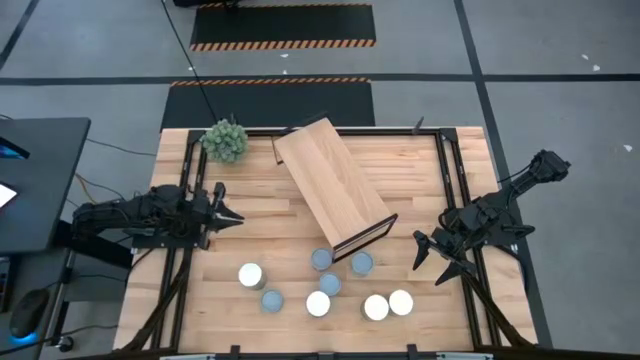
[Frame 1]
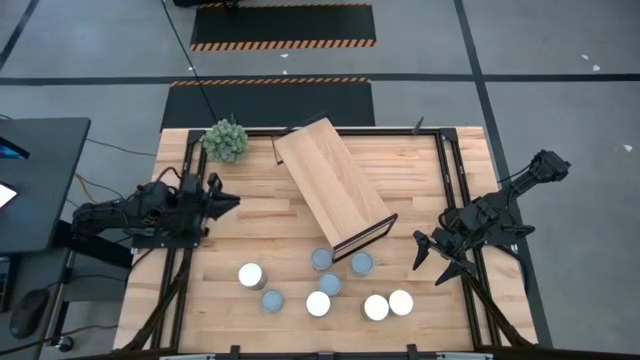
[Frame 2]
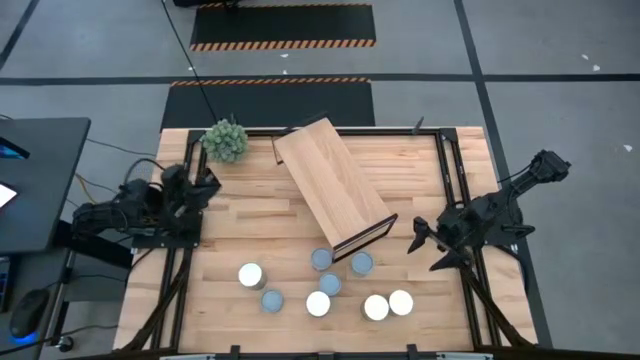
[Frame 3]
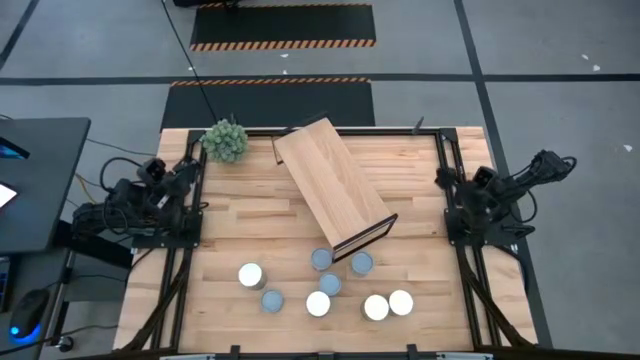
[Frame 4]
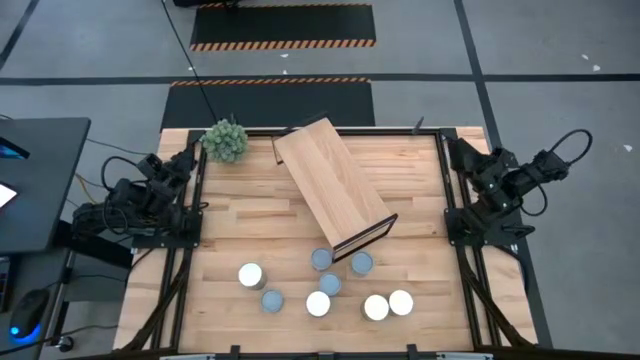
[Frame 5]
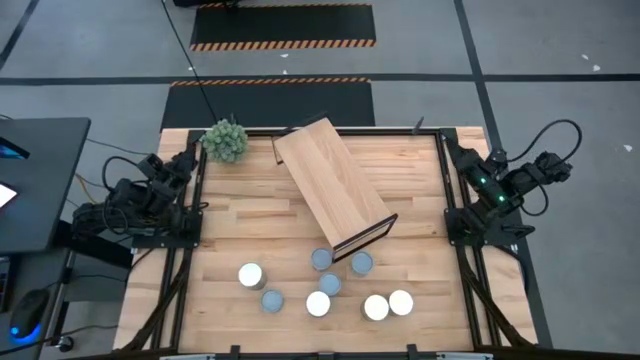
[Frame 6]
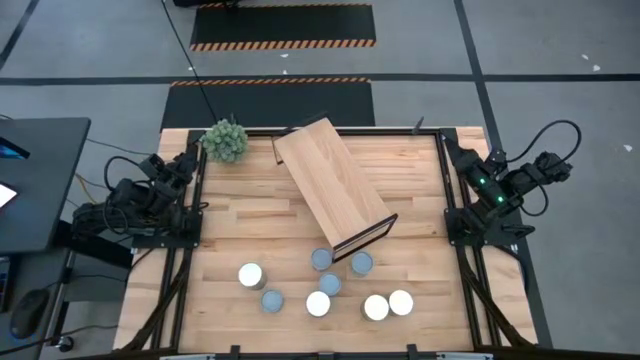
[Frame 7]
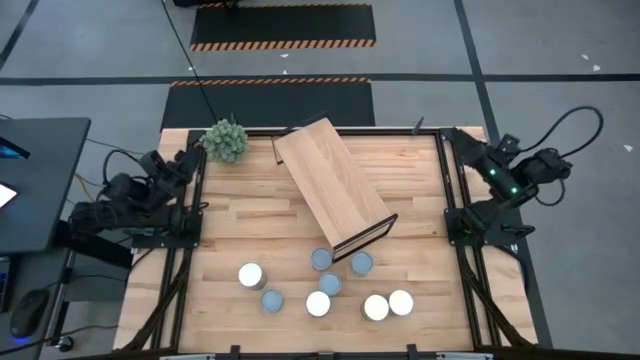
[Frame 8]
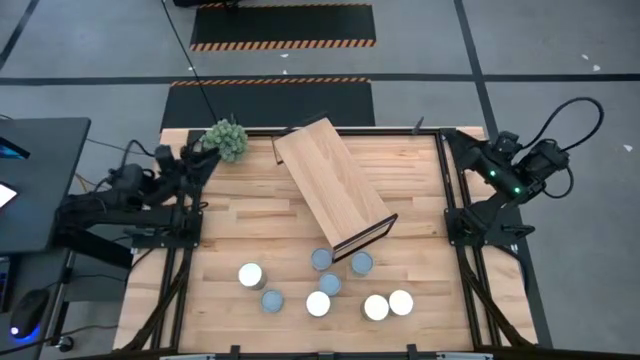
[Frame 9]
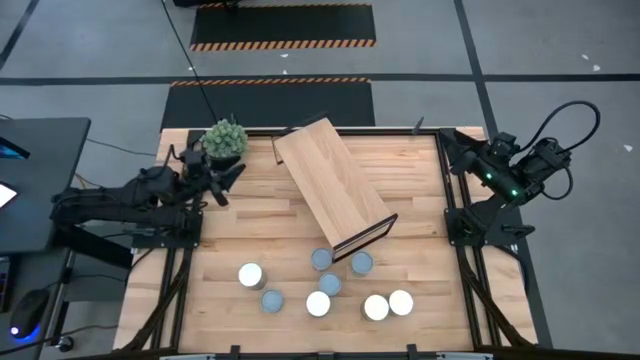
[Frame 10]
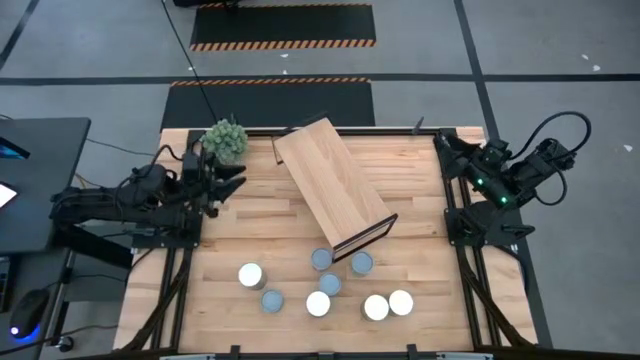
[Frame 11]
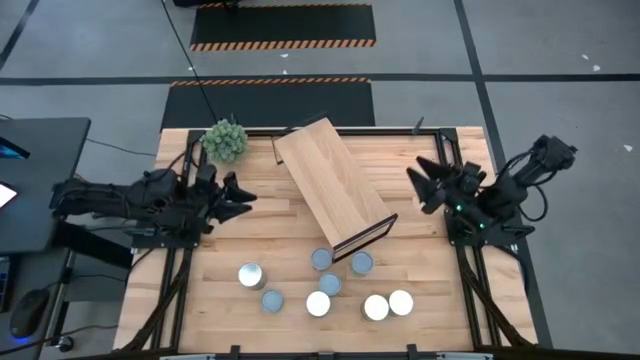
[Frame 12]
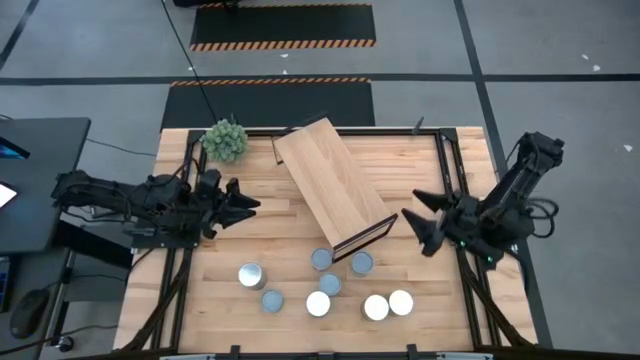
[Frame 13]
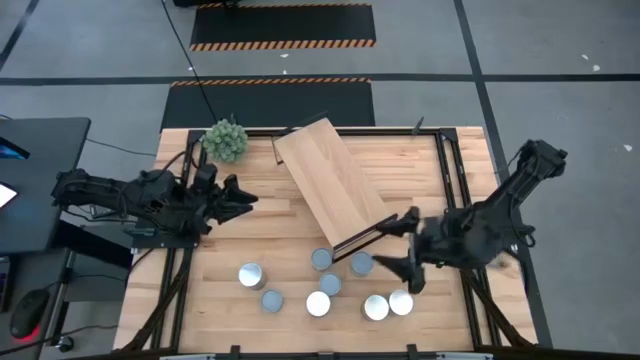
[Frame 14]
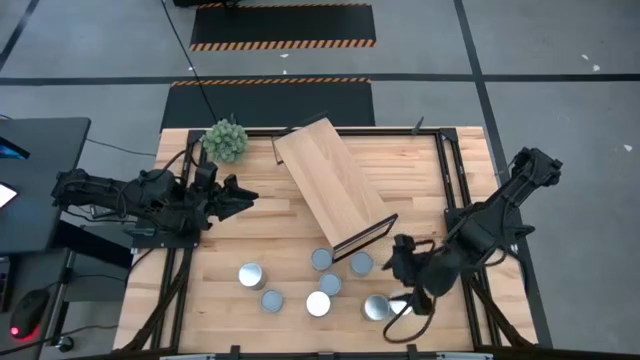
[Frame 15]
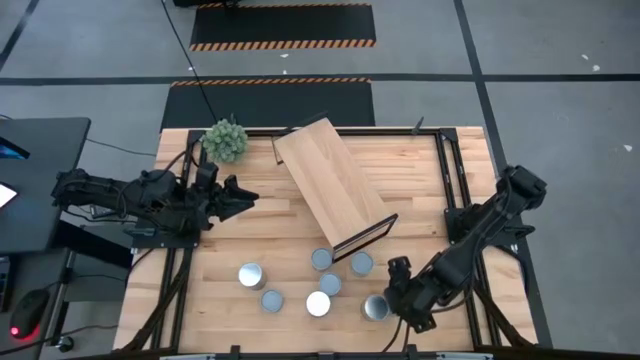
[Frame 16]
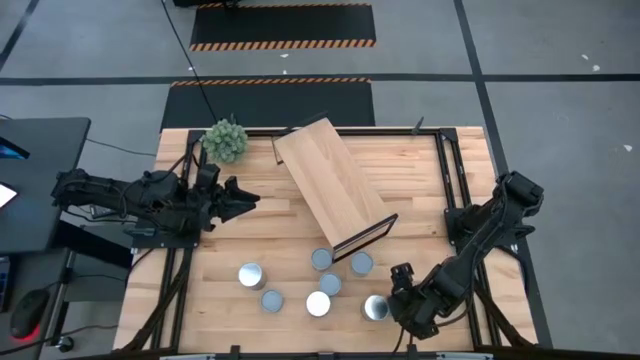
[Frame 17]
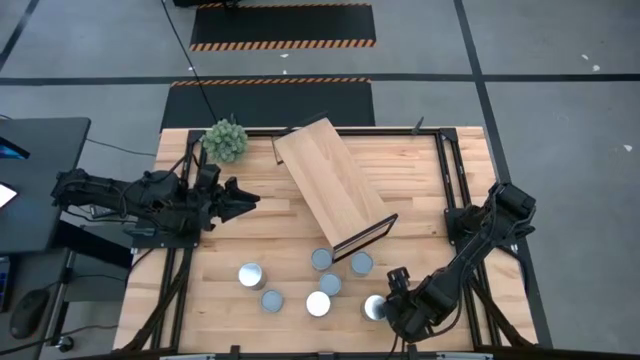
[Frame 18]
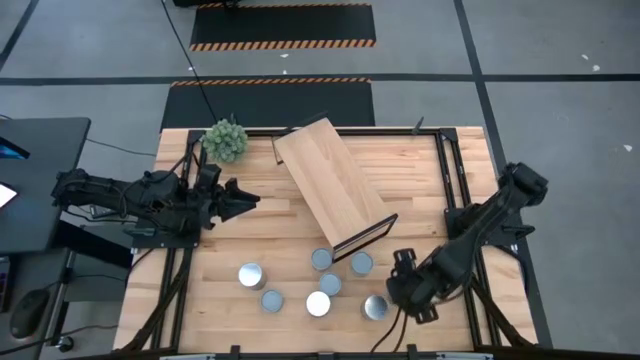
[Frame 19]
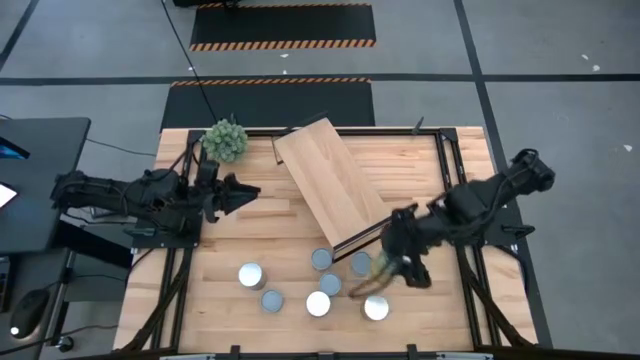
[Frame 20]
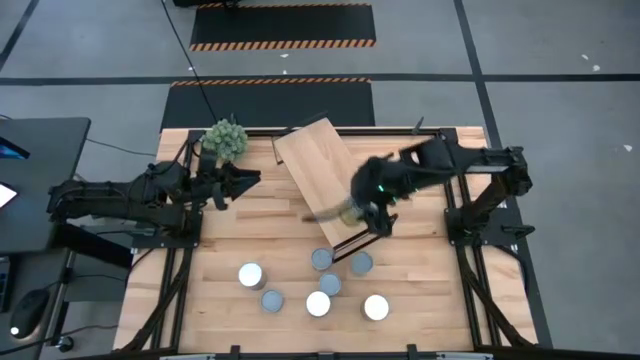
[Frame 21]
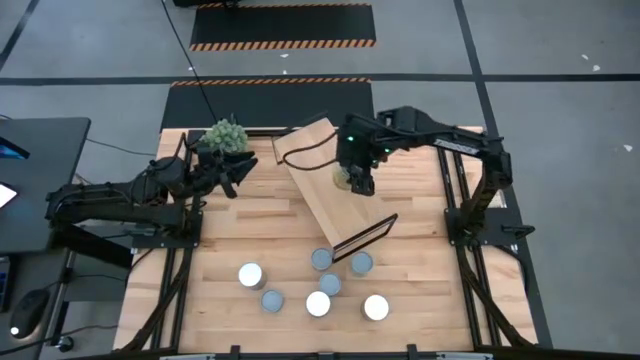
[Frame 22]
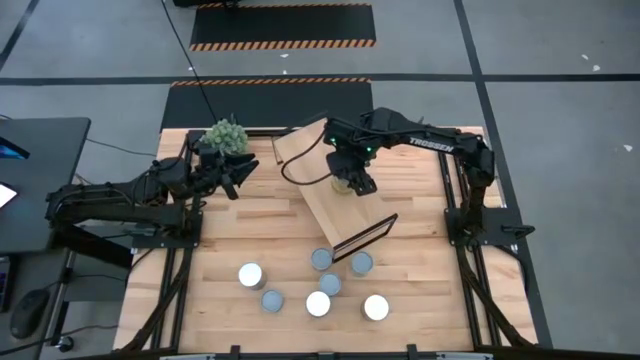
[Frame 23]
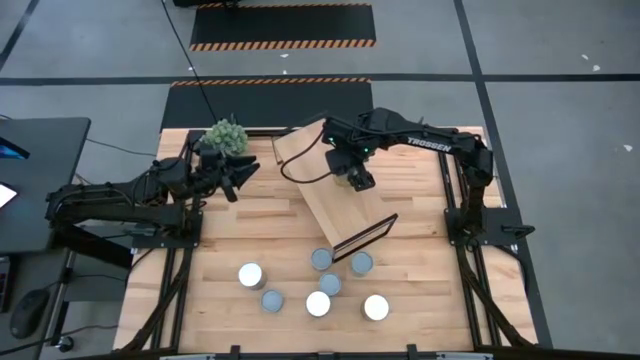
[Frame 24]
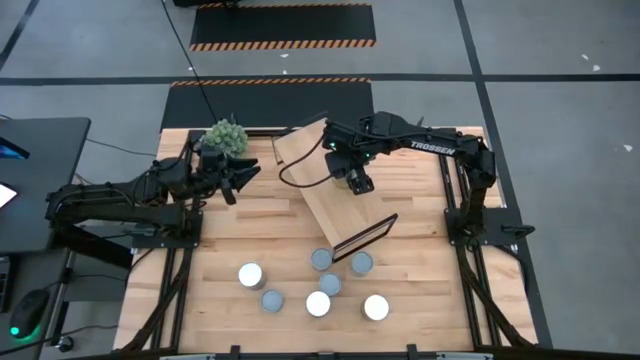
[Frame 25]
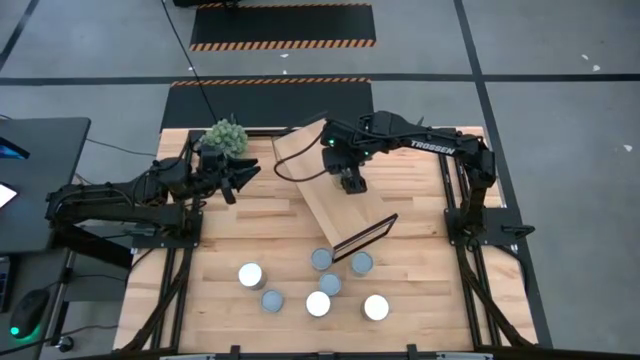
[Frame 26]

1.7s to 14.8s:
Task: Pick and place cans onto a shelf
Put the blue-yellow can on the shelf

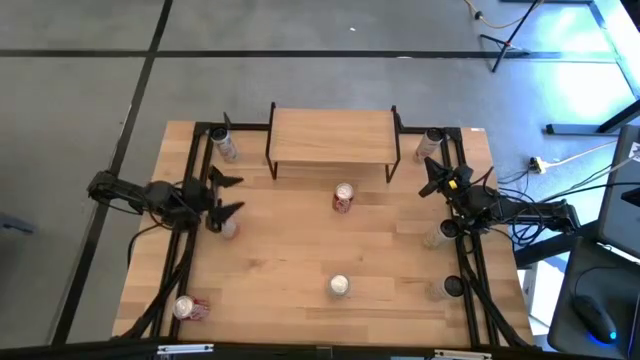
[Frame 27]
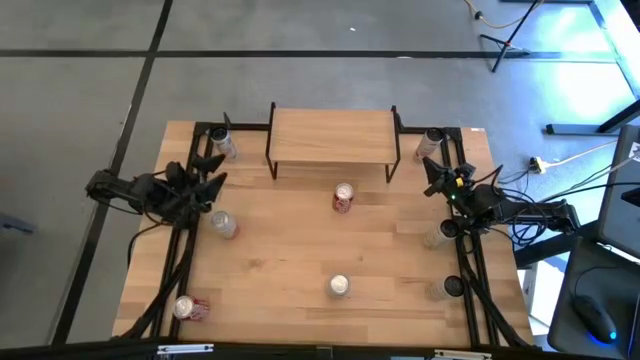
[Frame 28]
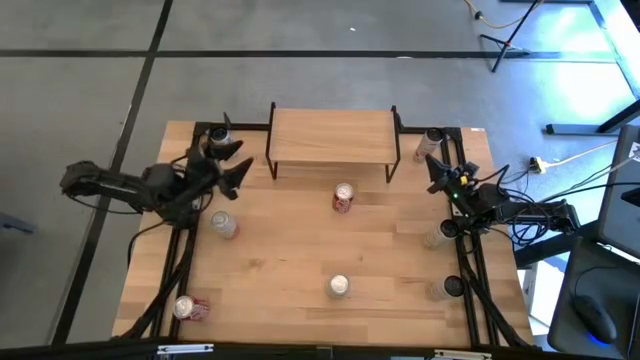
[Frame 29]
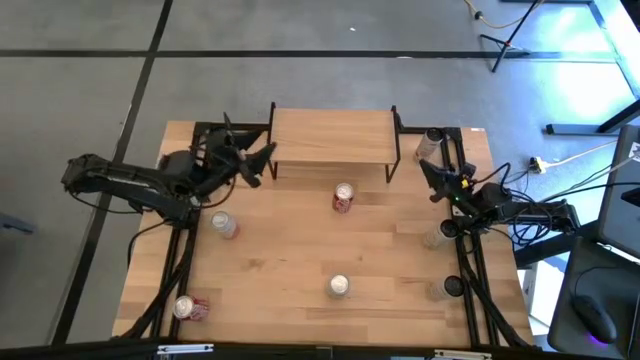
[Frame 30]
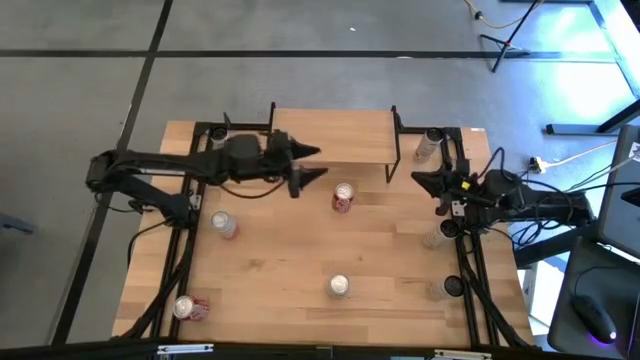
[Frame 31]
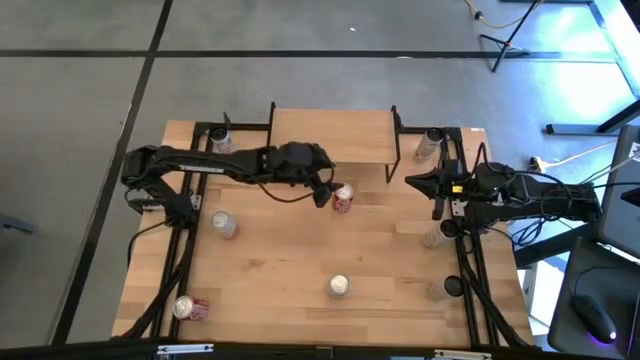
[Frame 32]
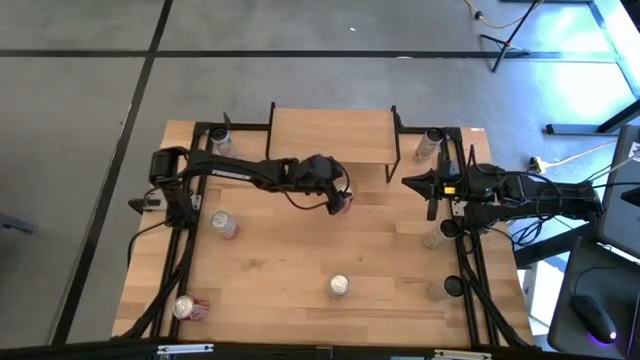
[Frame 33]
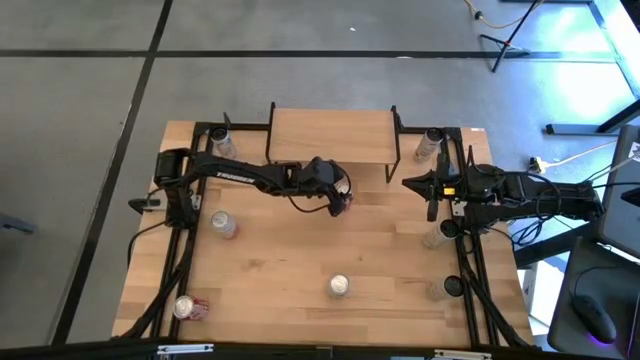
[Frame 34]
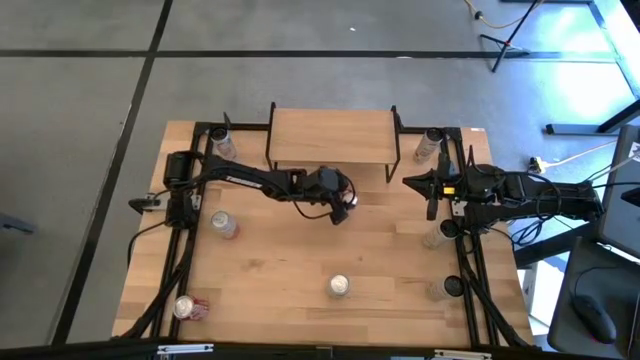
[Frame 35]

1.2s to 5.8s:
Task: Place canned beverage on shelf
Put the top red soda can on the shelf
